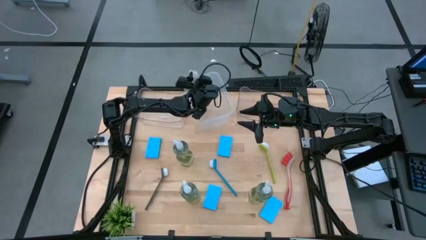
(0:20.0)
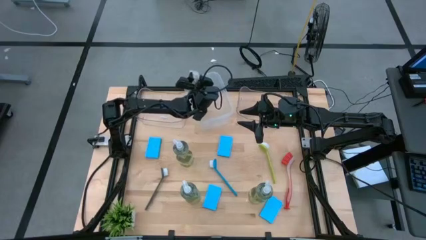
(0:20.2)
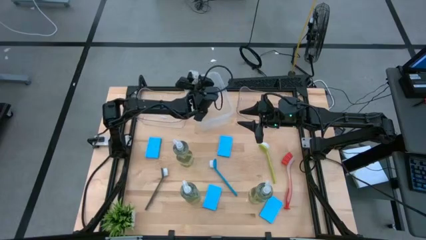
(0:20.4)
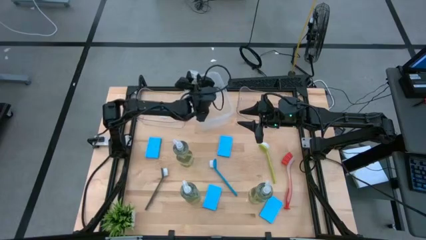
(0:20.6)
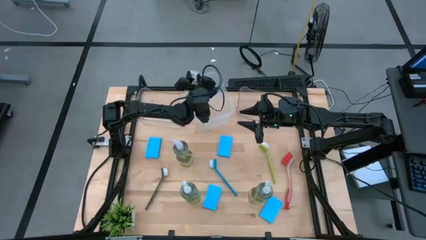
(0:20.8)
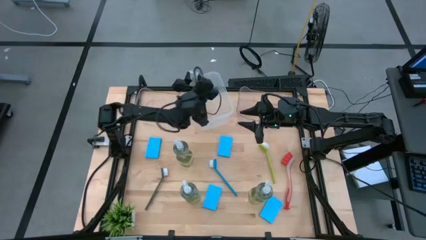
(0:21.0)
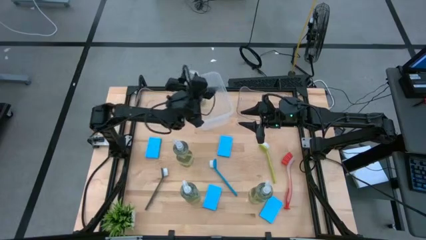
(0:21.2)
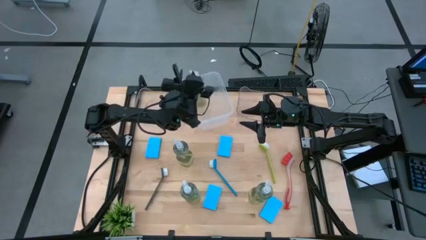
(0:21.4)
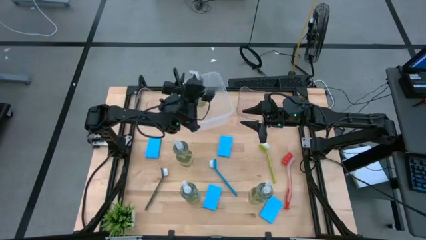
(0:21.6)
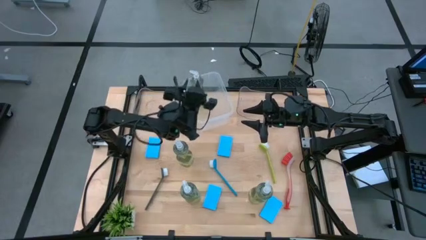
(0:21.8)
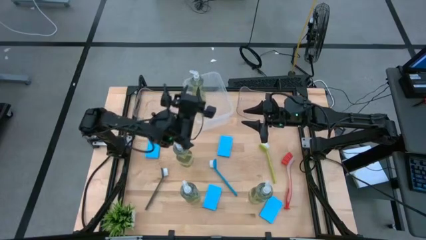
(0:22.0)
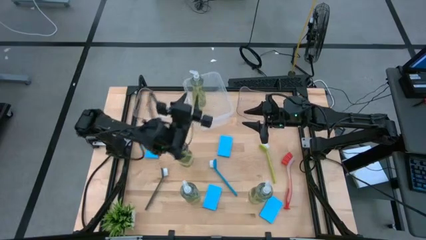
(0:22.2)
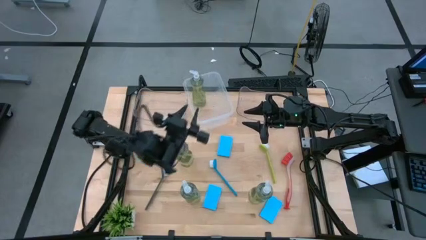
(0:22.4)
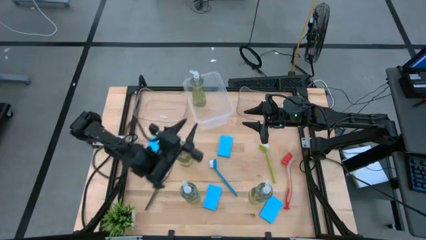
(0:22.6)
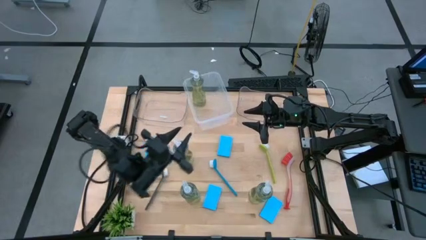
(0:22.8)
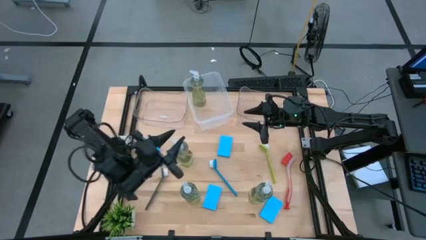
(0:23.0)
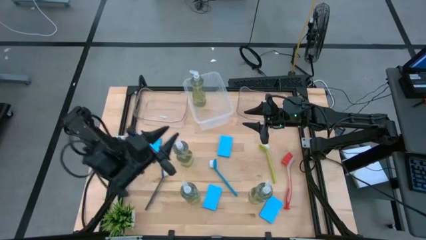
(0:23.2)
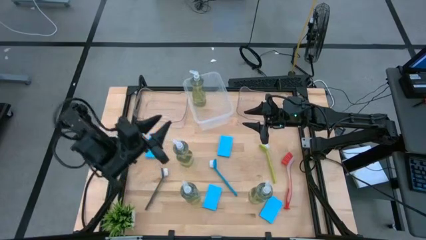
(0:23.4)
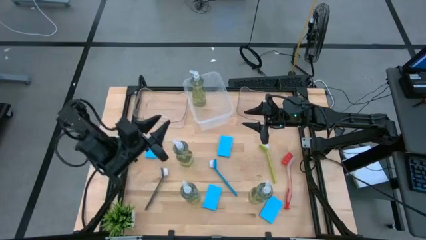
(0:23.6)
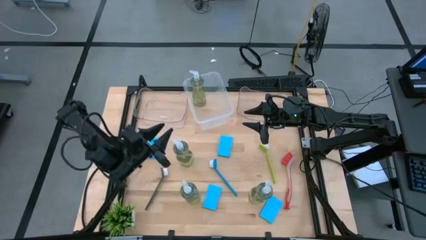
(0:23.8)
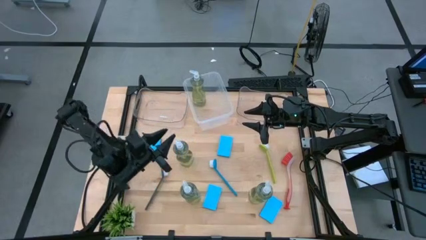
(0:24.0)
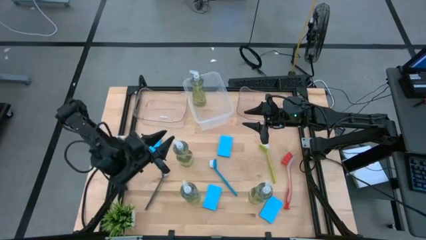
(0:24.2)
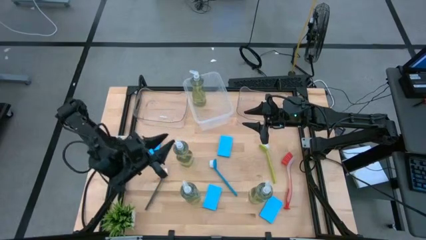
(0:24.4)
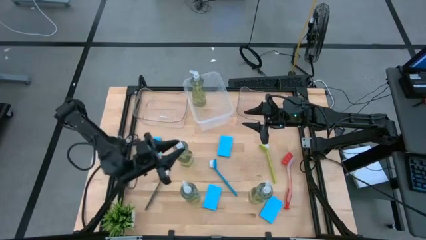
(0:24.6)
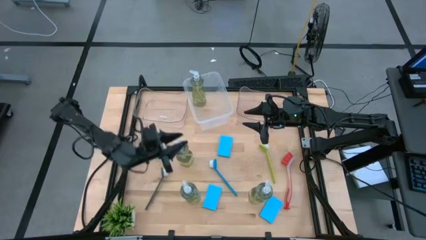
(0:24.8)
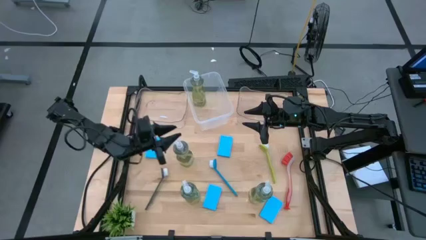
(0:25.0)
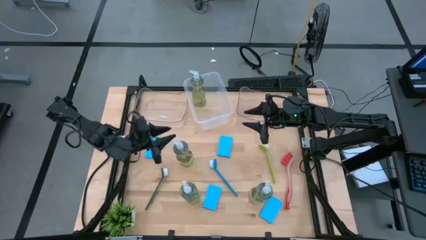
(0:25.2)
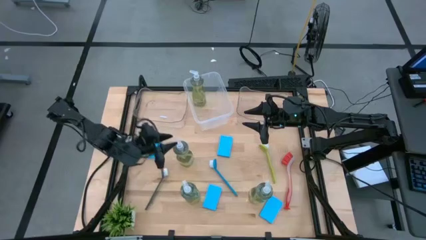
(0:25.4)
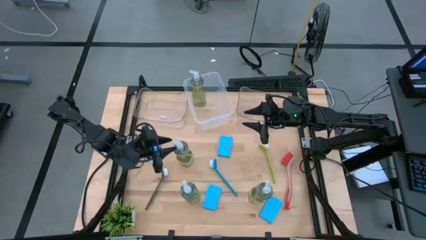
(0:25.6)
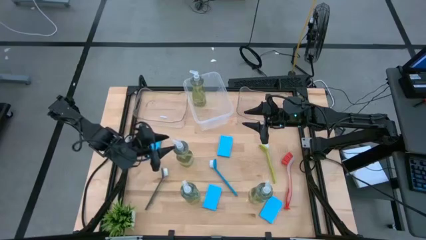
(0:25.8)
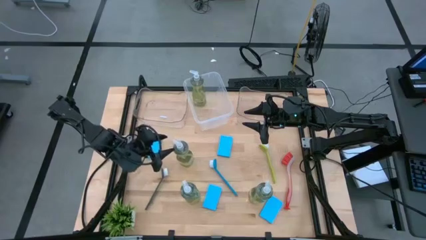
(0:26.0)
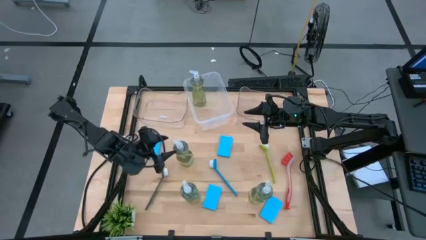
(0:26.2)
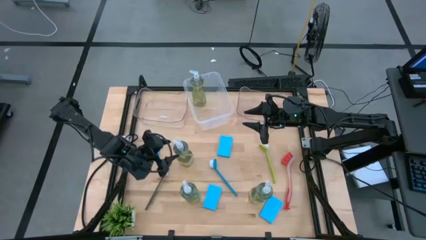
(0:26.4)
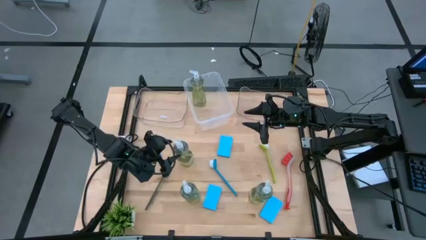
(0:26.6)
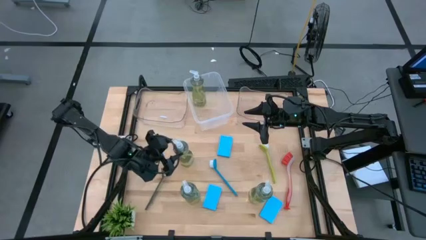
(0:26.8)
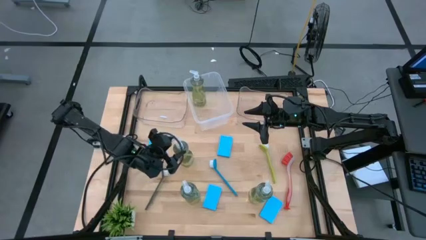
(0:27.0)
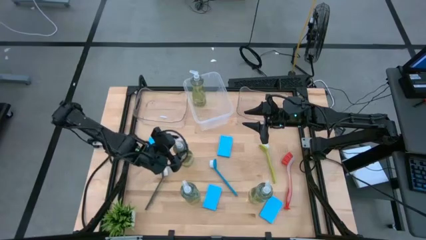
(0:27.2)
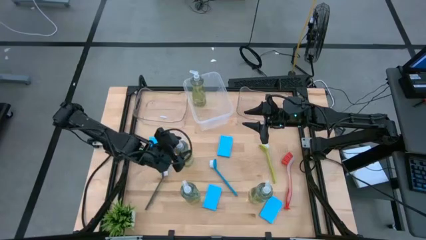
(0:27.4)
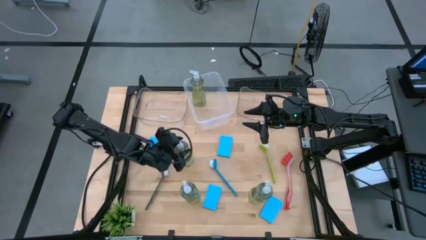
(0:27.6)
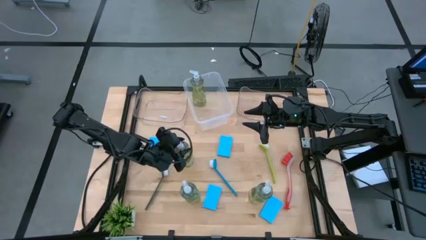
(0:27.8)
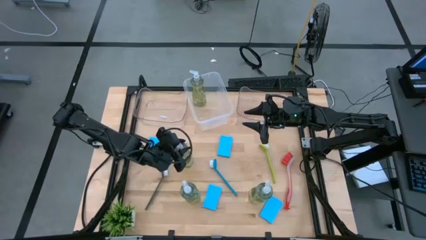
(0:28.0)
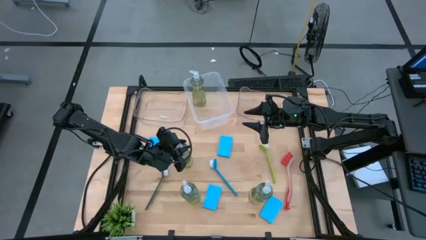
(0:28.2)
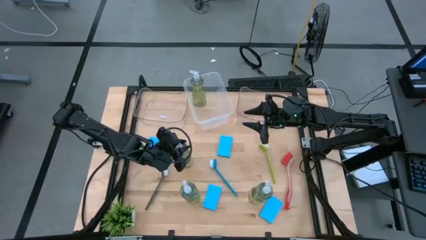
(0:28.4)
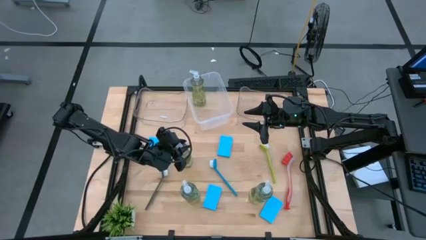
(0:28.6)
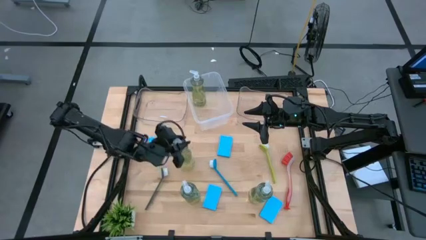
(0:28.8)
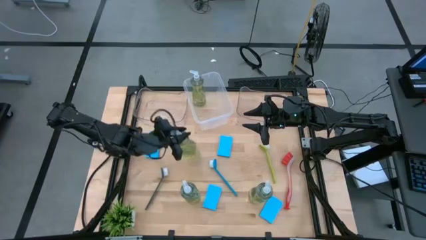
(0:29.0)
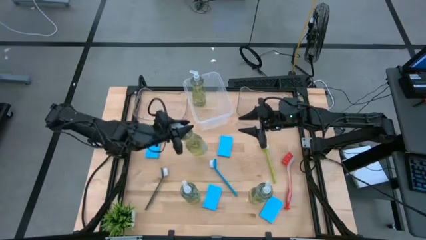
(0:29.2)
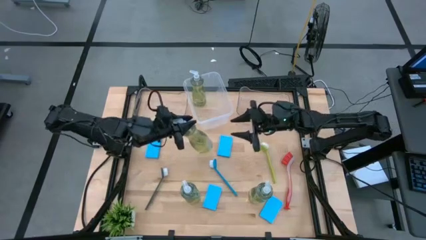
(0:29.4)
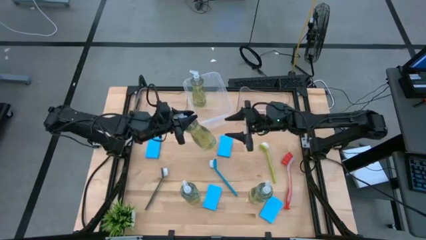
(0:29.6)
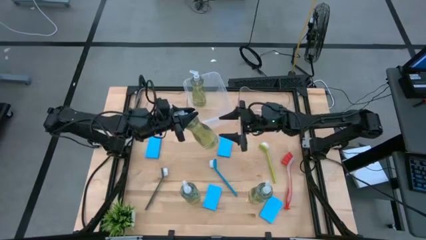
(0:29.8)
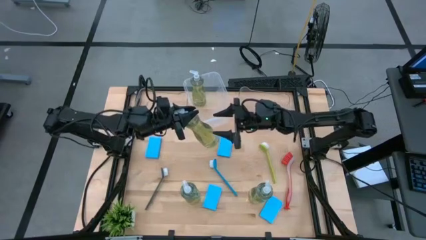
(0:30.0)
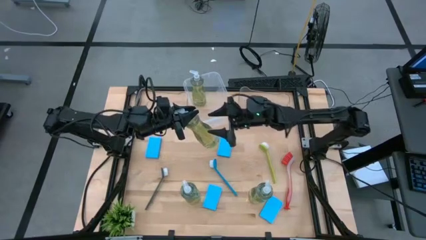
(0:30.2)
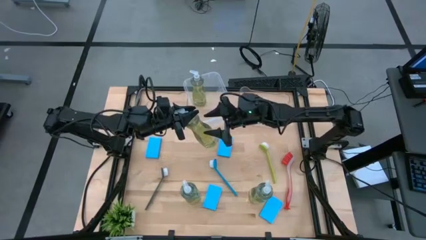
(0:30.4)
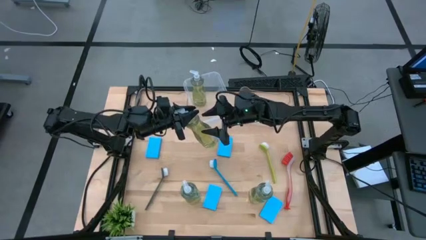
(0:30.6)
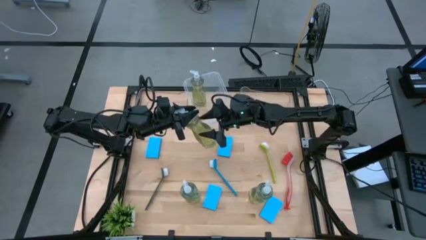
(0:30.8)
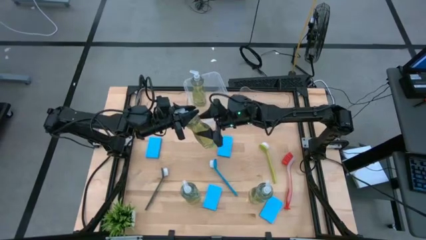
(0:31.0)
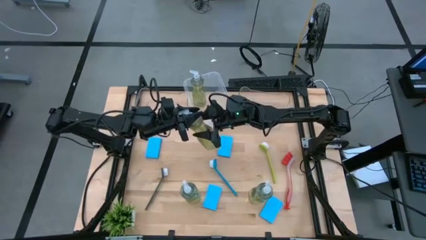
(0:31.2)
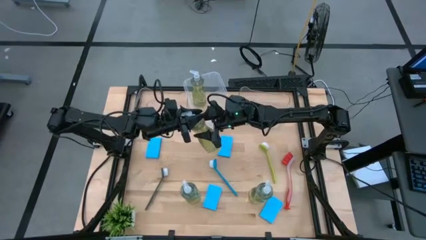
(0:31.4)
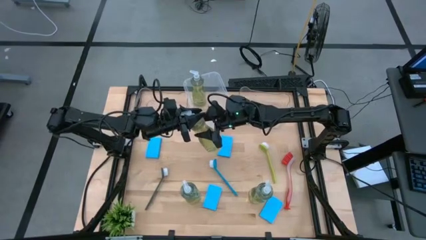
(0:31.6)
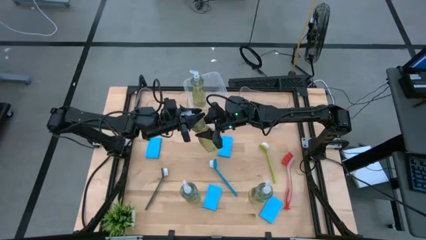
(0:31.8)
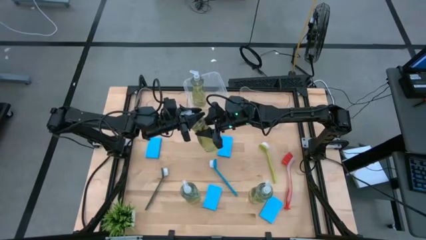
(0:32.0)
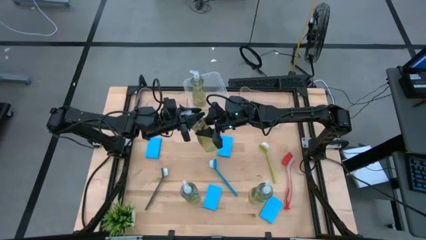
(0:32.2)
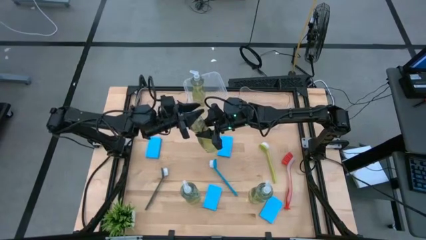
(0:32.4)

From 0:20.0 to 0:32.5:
Task: Pick & Place Kitchen Sink Supplies
Put the dish soap into the white bin
